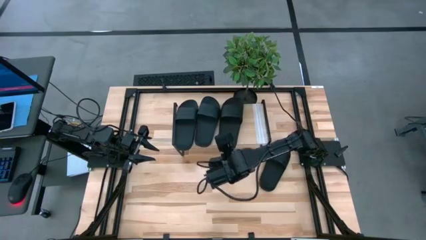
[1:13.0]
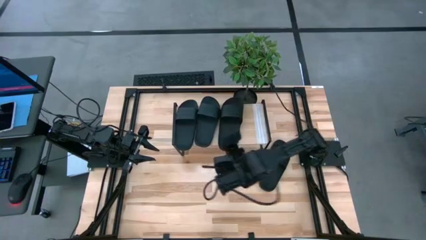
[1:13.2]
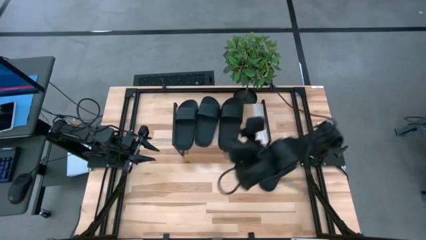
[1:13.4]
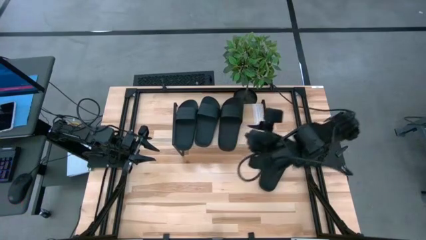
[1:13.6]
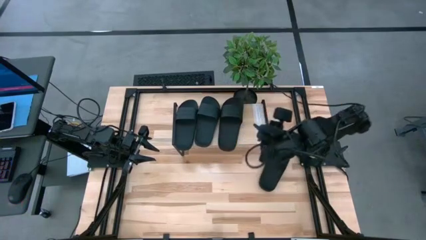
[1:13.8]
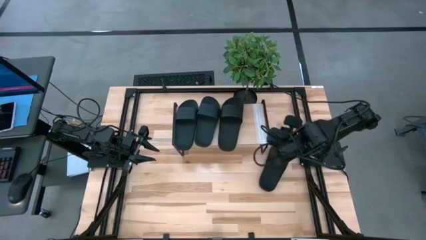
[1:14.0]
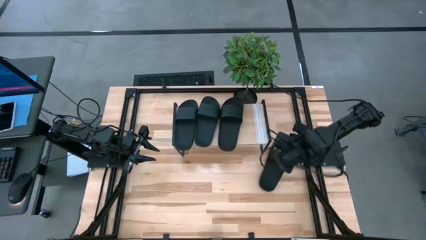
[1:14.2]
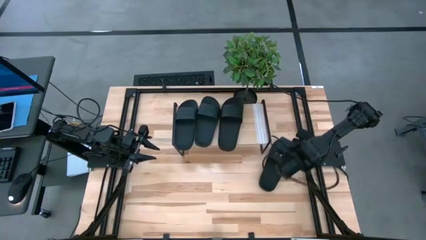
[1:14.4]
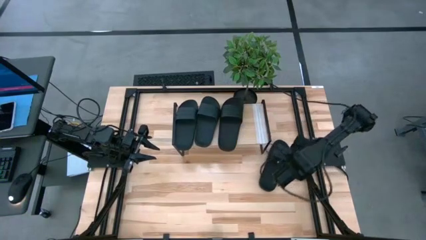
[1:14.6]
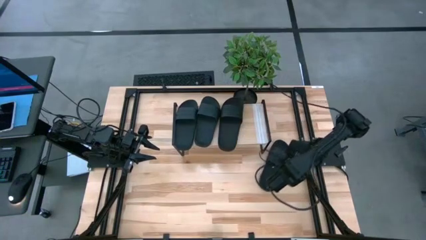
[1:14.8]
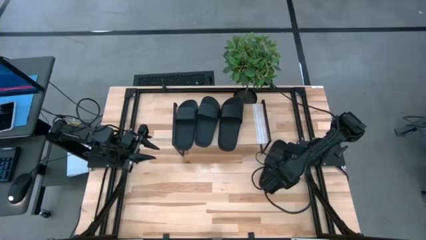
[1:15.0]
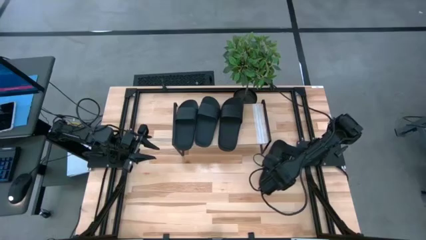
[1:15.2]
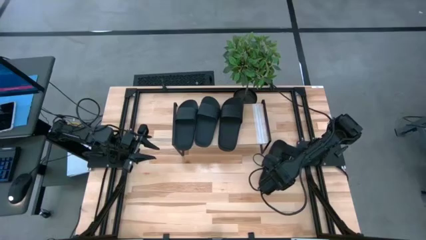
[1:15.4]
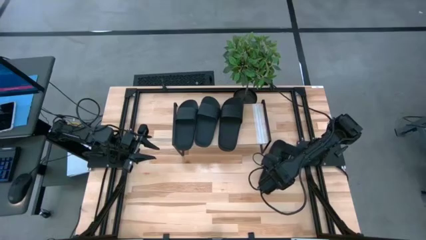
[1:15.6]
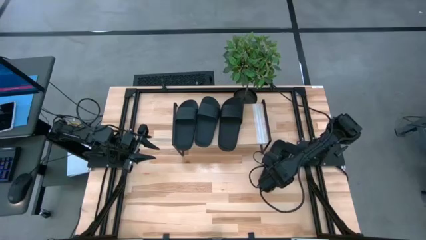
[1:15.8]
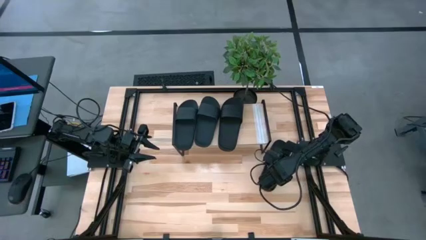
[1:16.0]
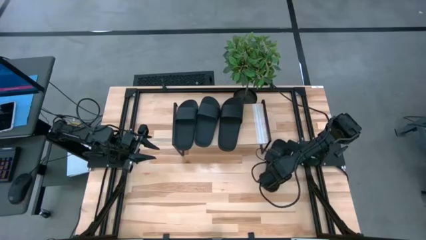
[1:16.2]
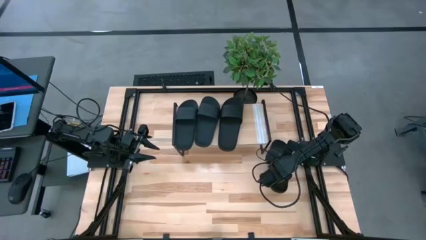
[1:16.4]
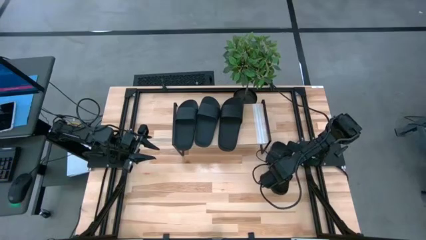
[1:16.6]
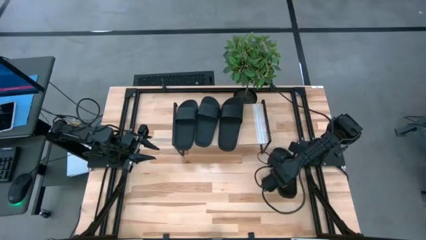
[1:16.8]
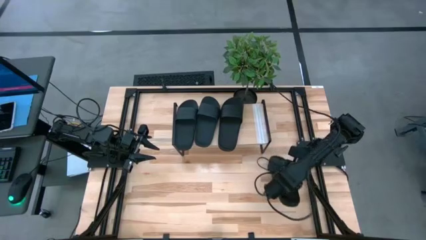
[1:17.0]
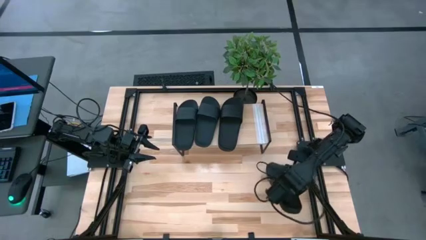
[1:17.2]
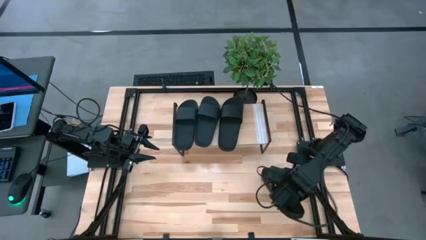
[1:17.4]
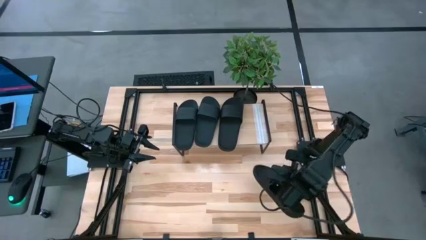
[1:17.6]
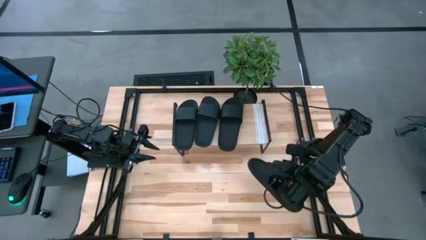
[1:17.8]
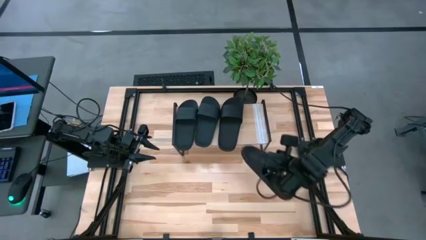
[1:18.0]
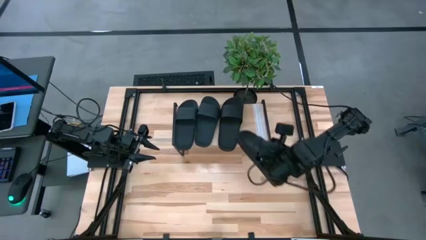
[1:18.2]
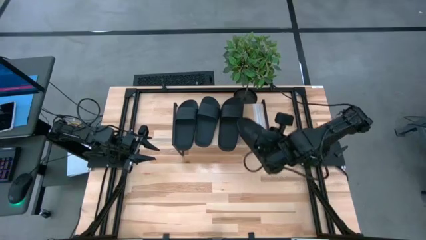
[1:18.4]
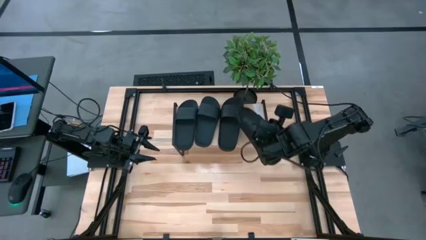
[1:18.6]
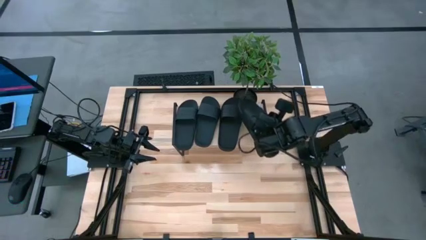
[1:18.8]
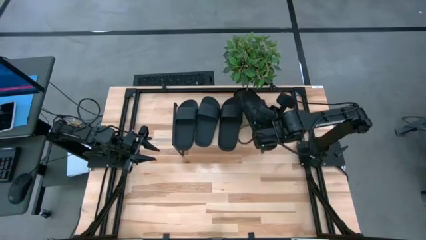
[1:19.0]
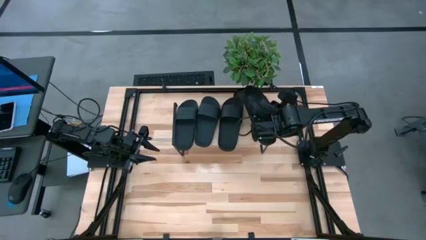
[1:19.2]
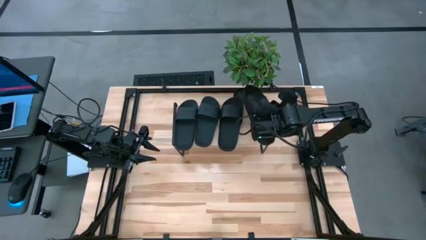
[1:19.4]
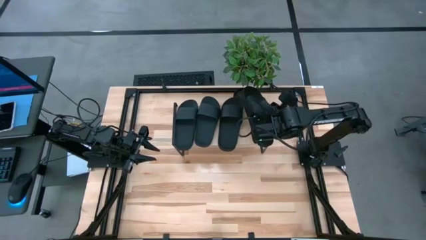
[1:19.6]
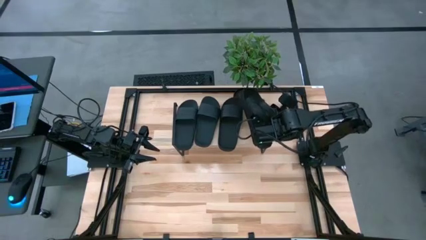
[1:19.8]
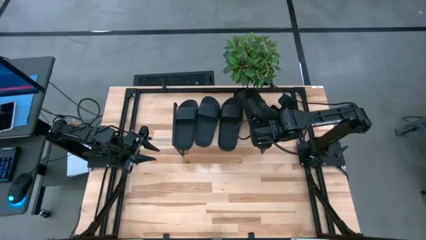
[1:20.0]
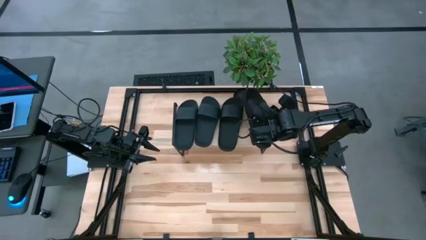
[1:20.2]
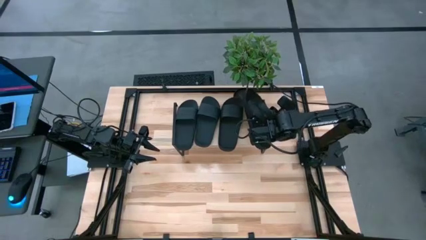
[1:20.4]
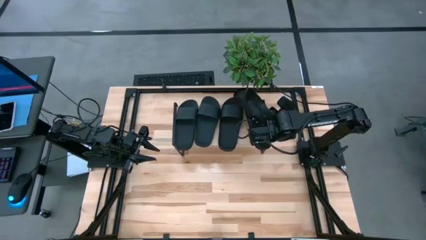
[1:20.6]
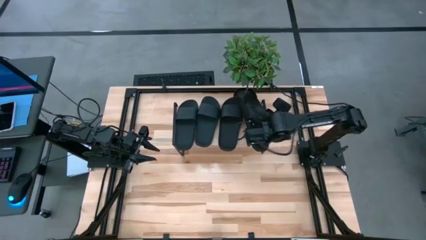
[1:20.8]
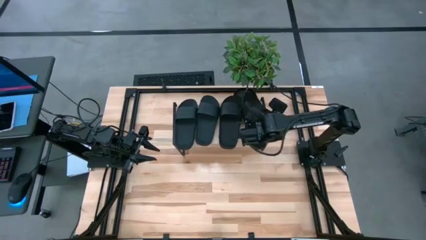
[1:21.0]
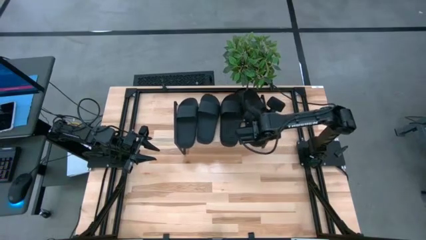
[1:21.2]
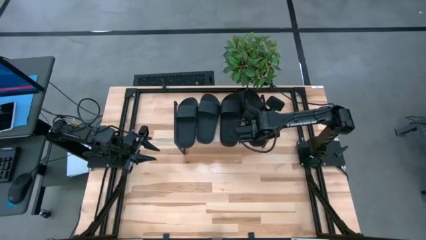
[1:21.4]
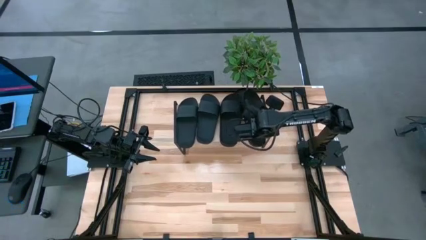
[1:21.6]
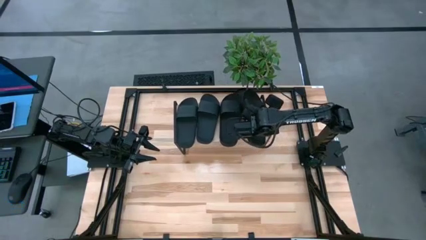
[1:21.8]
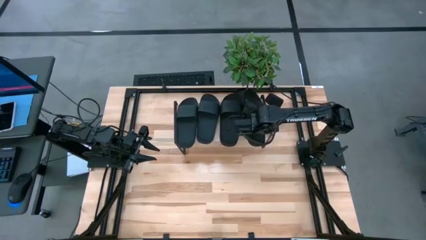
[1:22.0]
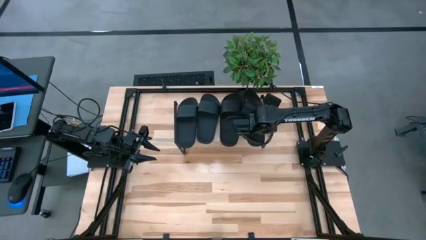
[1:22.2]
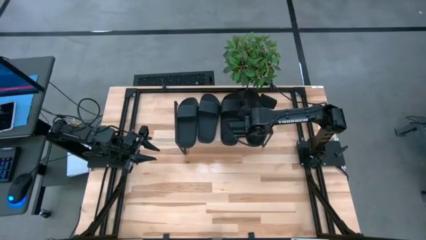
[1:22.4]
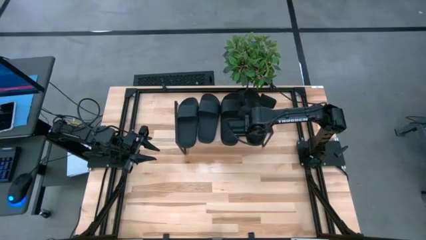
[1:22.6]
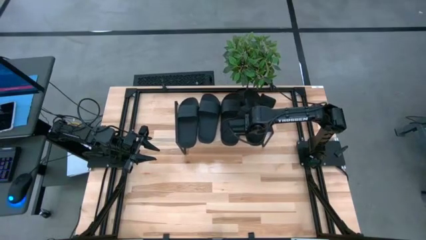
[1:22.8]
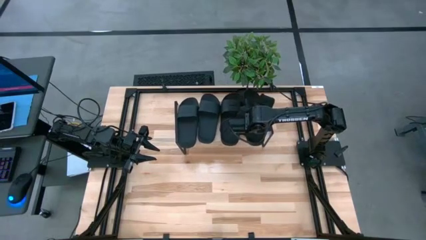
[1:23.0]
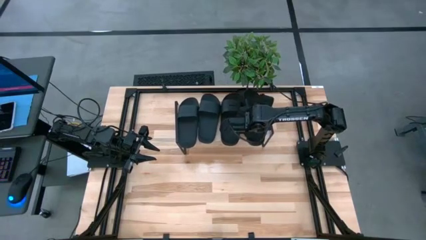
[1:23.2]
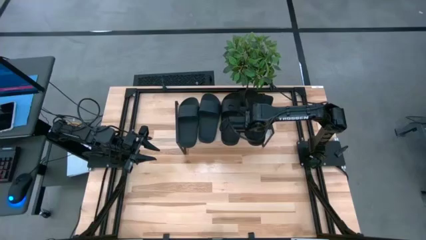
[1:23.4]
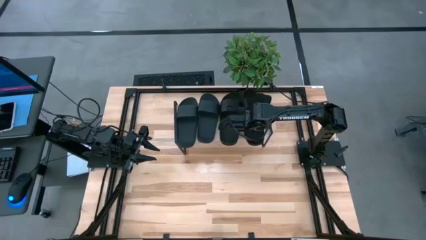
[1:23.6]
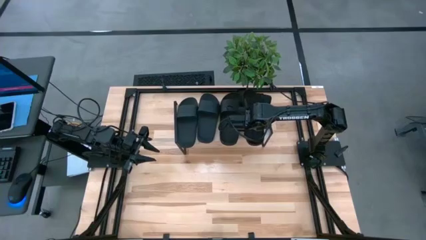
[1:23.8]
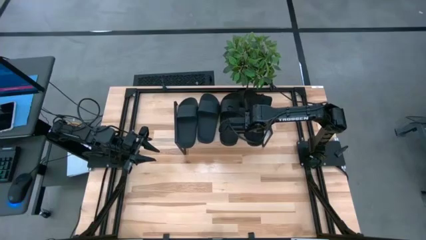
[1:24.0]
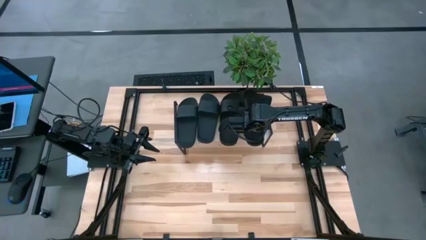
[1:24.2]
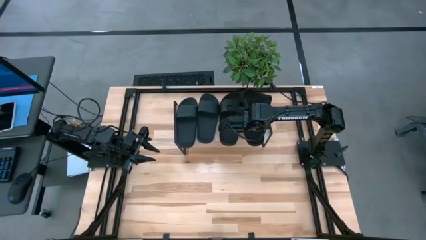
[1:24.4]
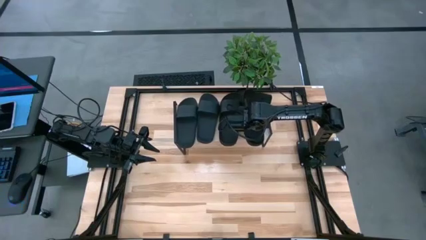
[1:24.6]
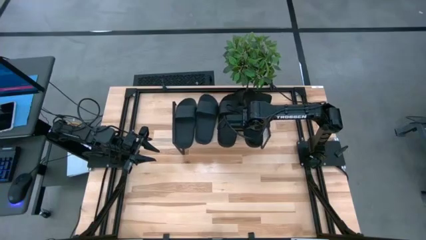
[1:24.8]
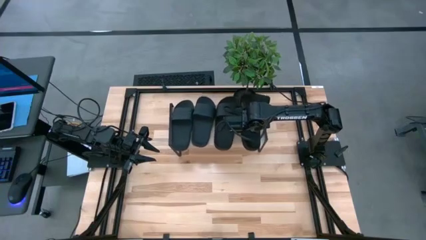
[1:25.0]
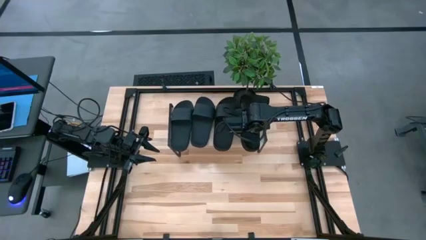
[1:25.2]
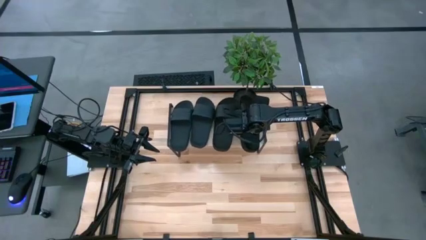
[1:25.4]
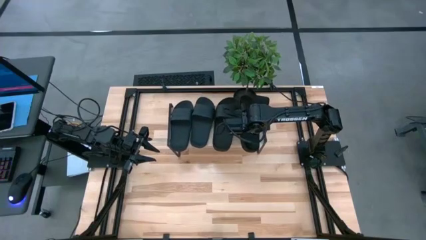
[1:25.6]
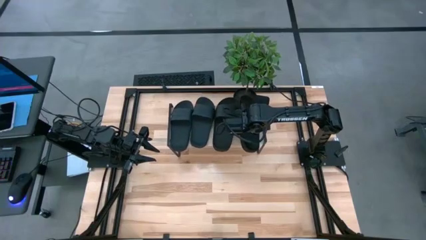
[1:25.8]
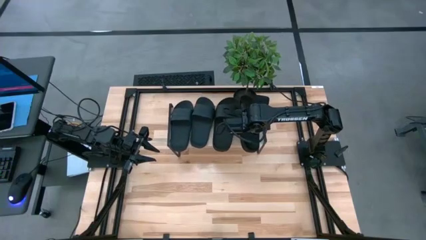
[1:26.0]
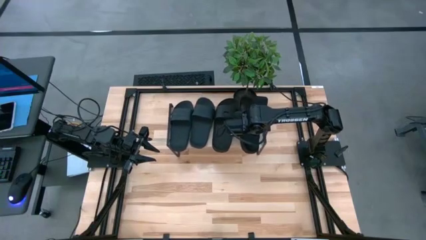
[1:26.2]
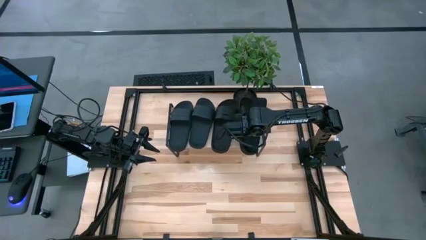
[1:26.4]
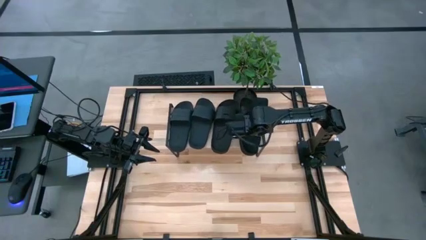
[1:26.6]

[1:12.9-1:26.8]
Task: Pick and place slides into the shelf
Put the black slide on the shelf

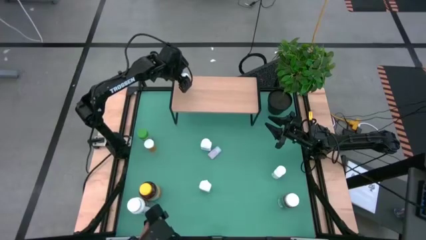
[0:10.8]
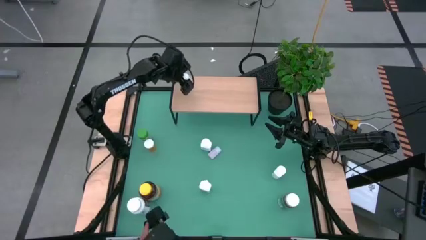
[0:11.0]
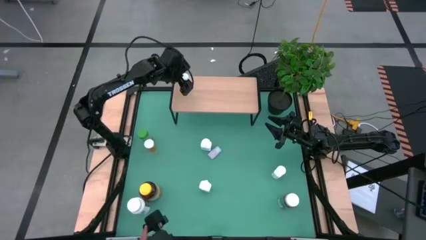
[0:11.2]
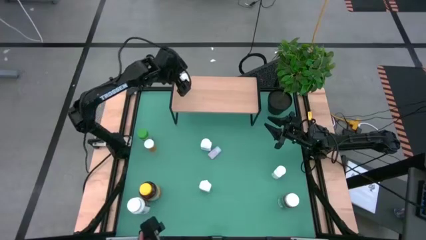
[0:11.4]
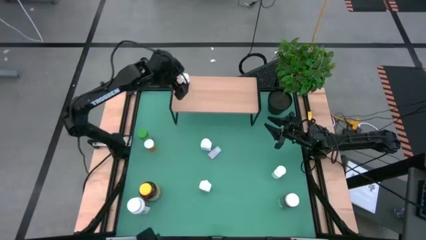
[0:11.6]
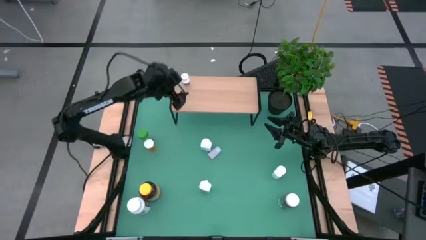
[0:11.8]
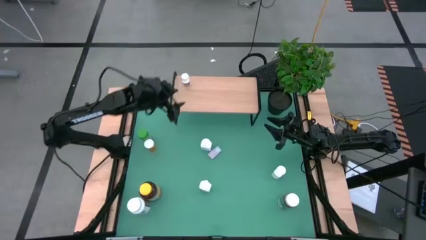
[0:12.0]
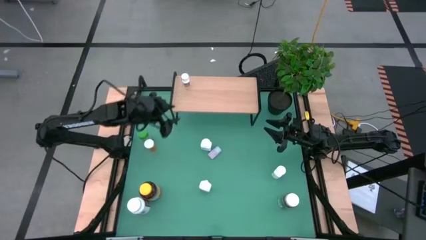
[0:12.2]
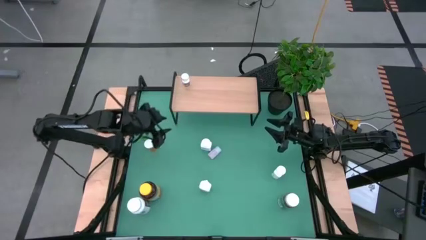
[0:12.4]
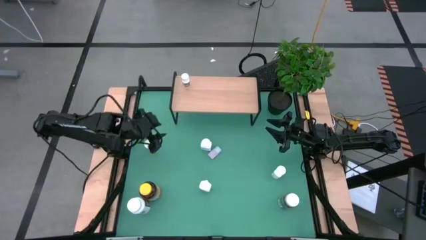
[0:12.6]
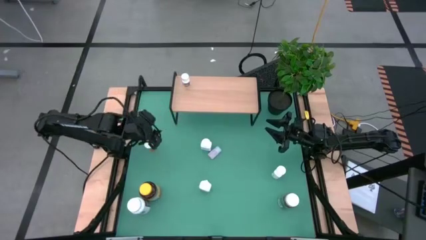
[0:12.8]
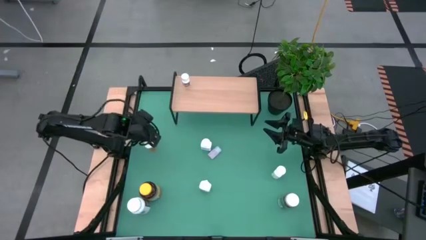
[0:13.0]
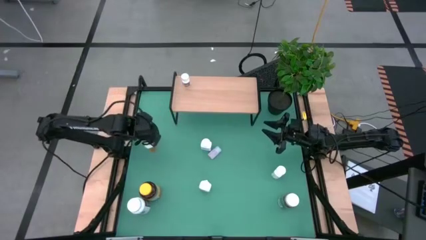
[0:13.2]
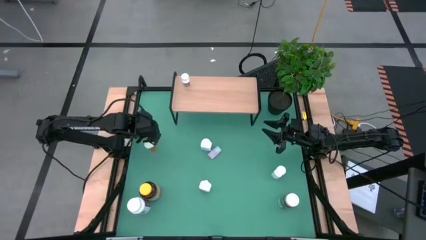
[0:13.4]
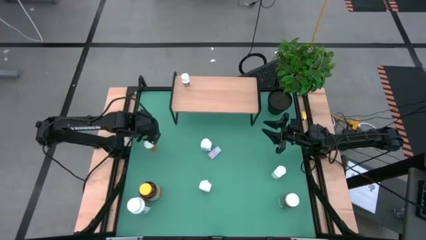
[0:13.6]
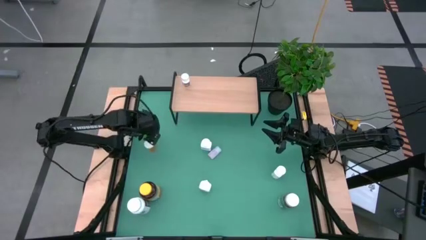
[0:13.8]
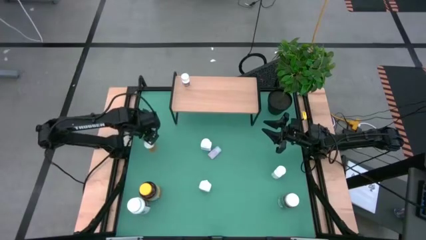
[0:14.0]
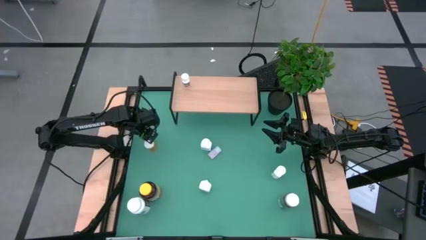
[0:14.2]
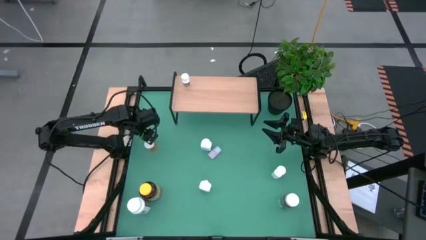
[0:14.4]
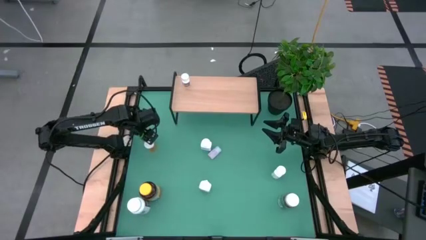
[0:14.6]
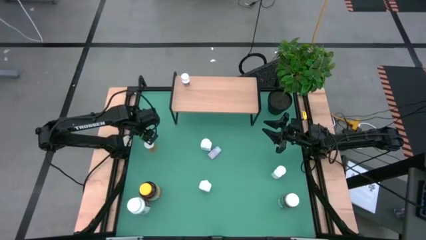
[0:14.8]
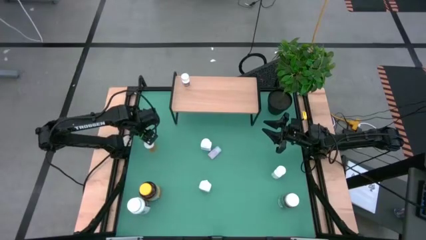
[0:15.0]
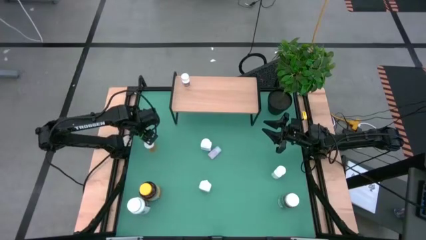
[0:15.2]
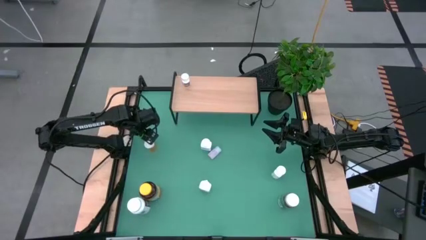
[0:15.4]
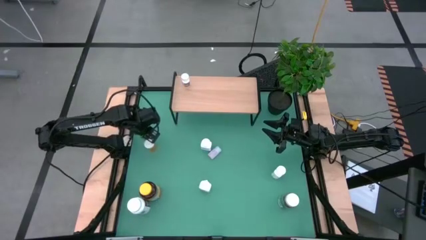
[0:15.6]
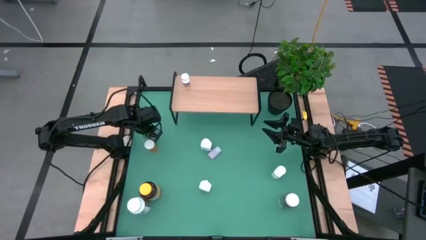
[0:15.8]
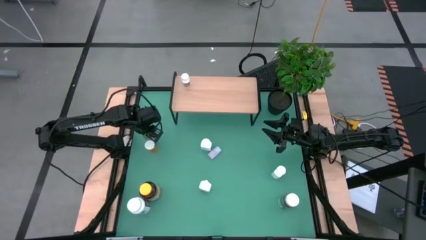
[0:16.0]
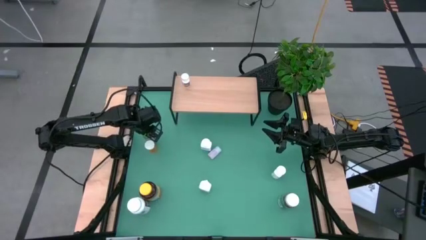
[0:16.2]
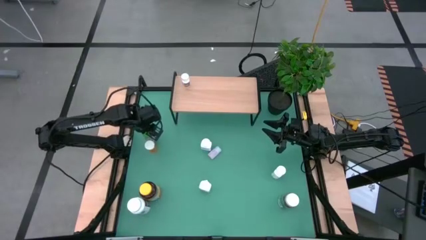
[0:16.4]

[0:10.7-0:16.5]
Task: Pick and place medicine bottles onto shelf by color
Put the green bottle on the shelf
